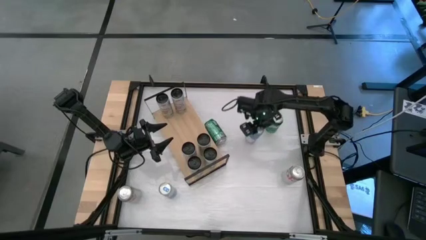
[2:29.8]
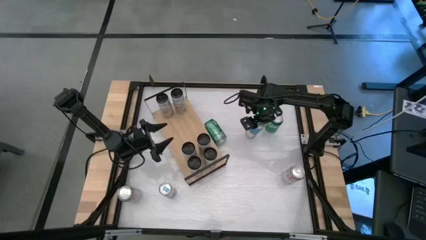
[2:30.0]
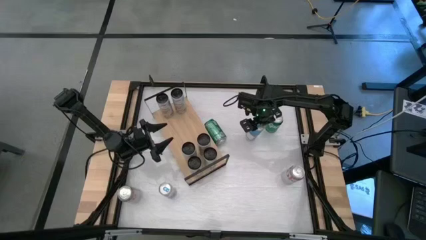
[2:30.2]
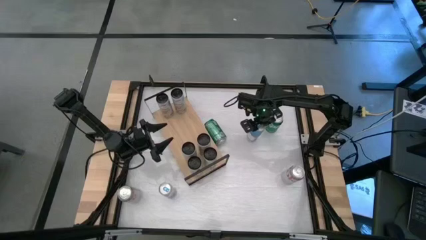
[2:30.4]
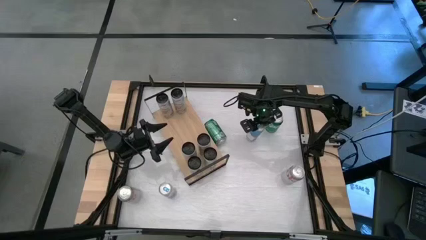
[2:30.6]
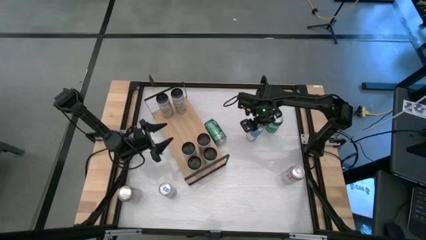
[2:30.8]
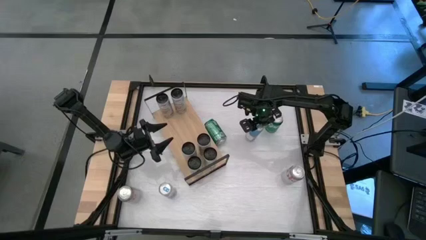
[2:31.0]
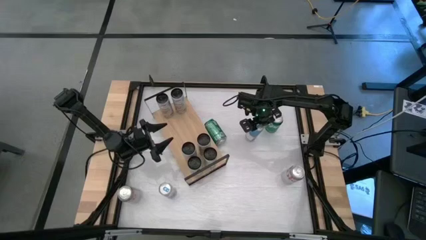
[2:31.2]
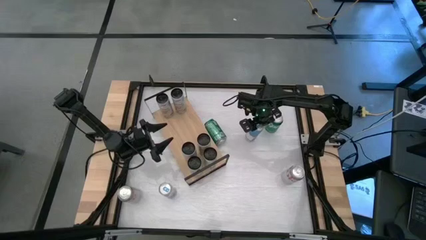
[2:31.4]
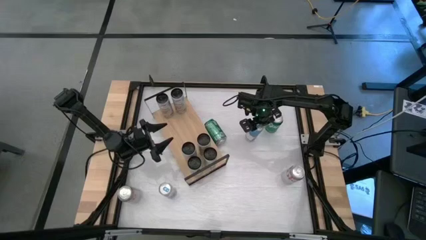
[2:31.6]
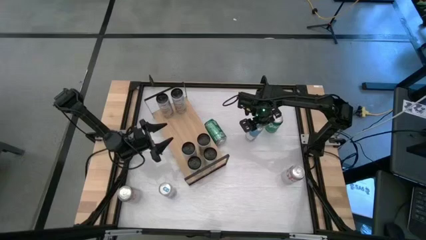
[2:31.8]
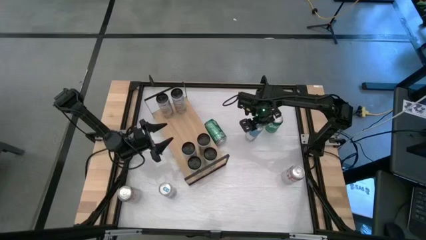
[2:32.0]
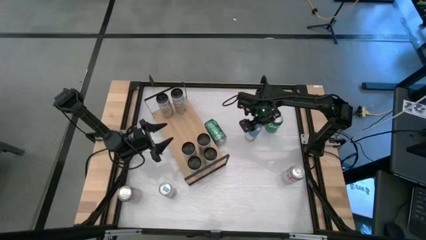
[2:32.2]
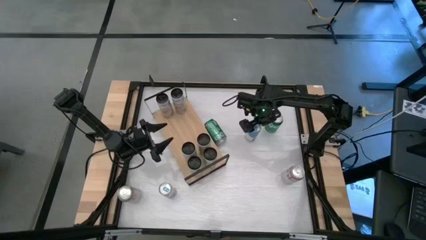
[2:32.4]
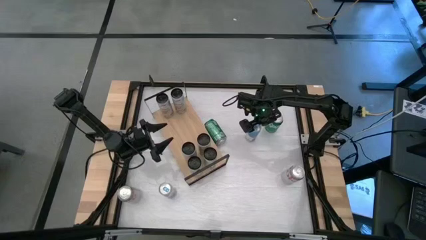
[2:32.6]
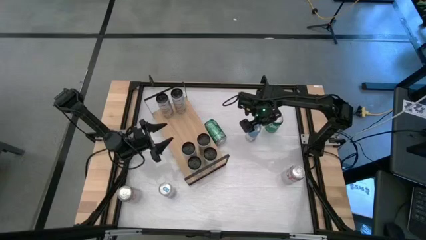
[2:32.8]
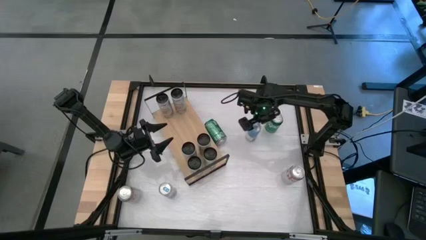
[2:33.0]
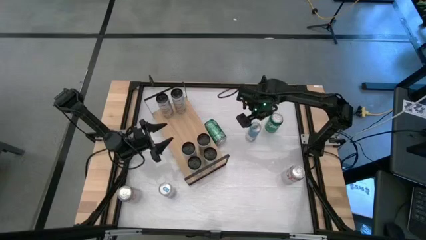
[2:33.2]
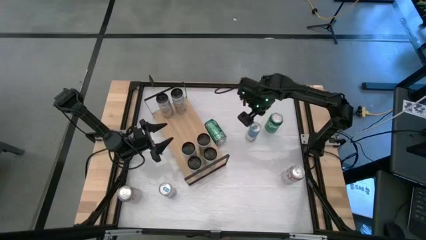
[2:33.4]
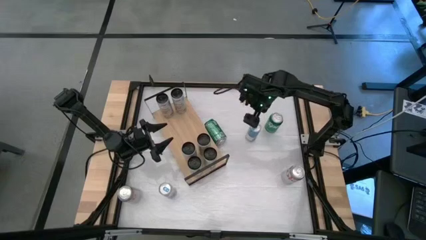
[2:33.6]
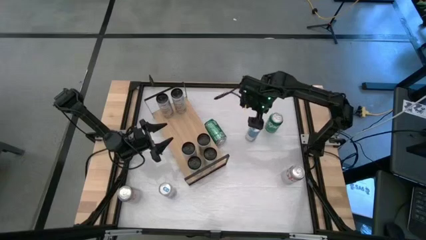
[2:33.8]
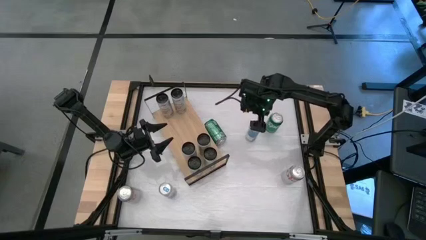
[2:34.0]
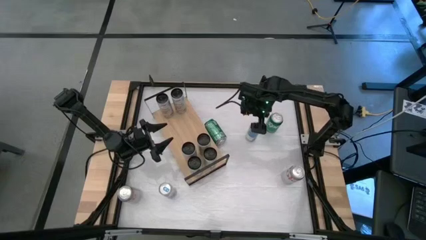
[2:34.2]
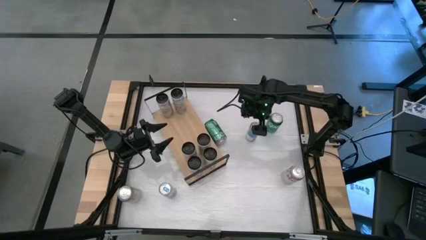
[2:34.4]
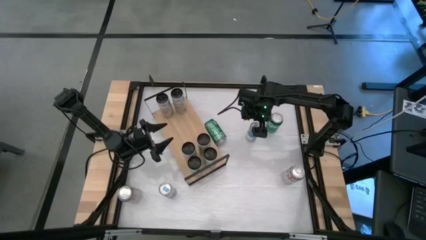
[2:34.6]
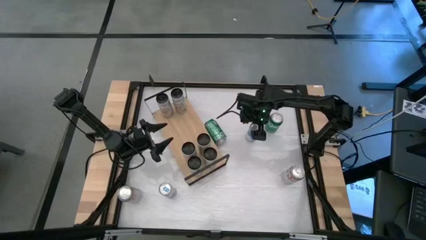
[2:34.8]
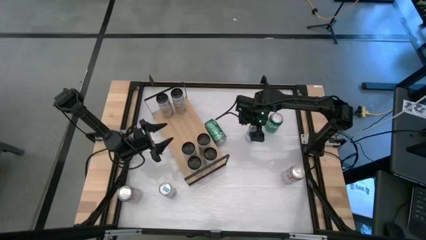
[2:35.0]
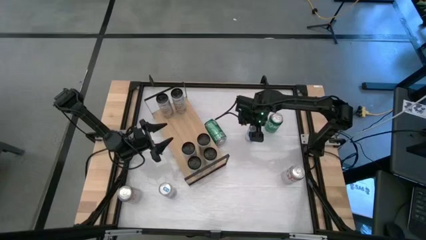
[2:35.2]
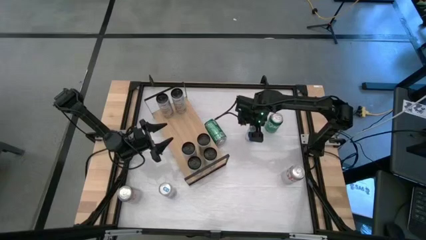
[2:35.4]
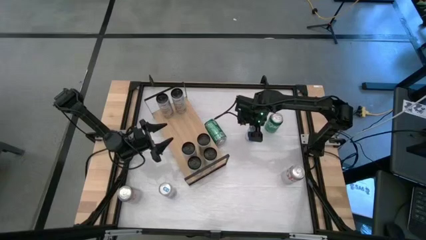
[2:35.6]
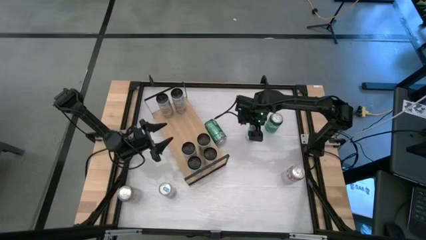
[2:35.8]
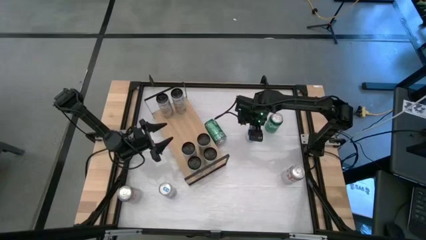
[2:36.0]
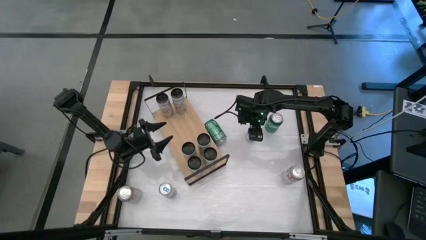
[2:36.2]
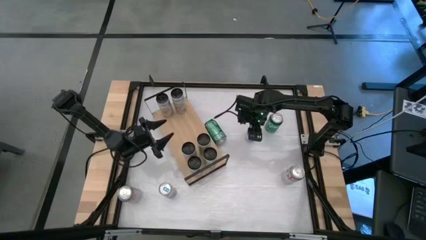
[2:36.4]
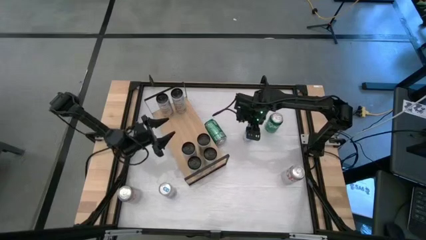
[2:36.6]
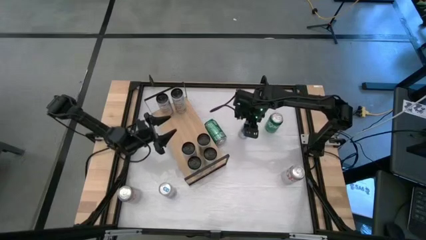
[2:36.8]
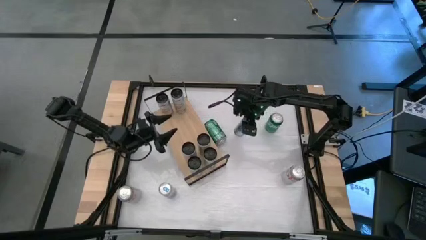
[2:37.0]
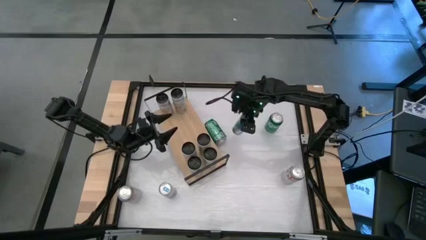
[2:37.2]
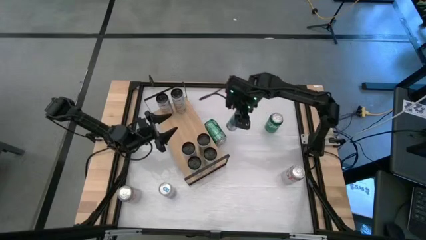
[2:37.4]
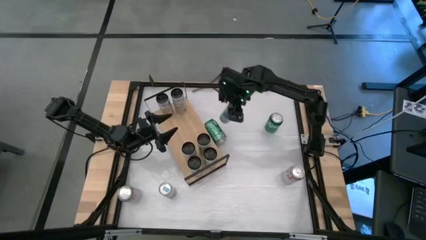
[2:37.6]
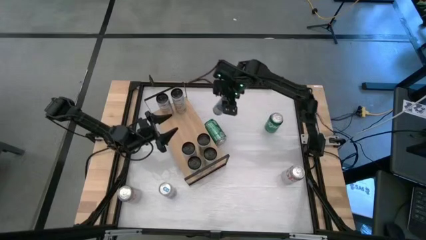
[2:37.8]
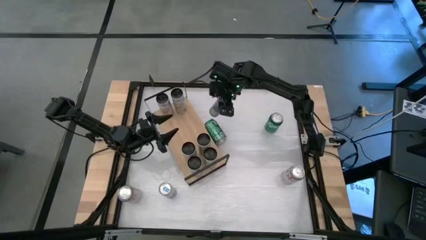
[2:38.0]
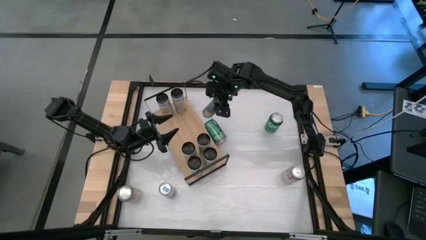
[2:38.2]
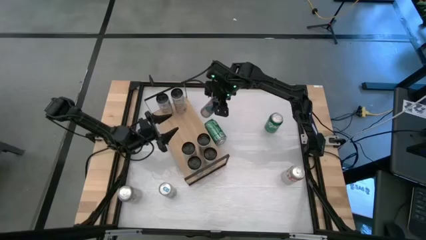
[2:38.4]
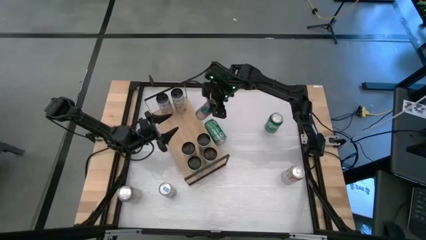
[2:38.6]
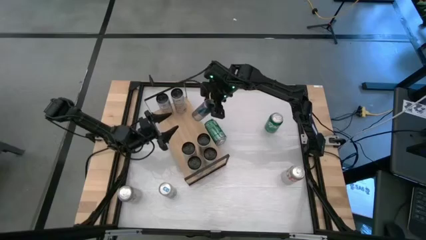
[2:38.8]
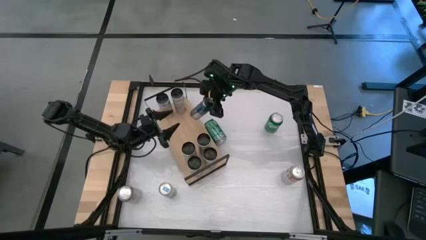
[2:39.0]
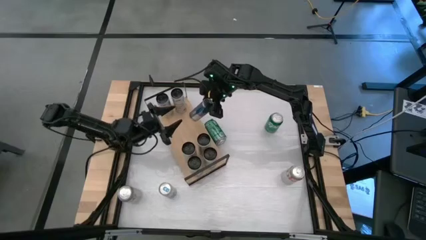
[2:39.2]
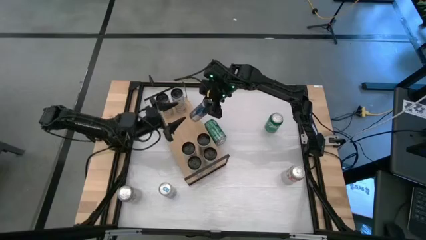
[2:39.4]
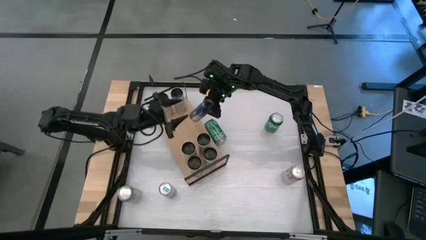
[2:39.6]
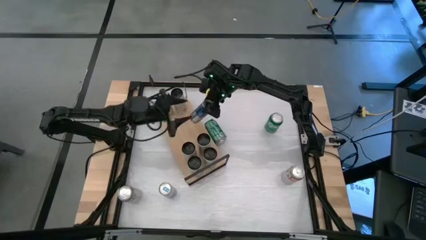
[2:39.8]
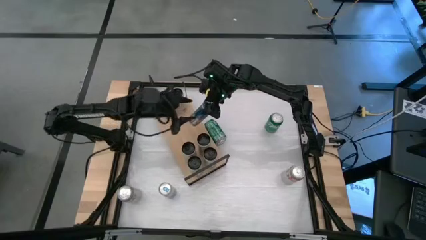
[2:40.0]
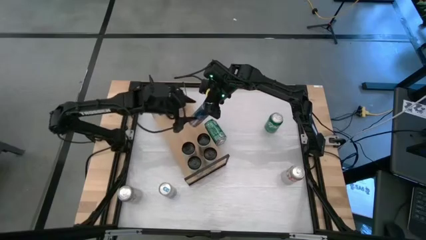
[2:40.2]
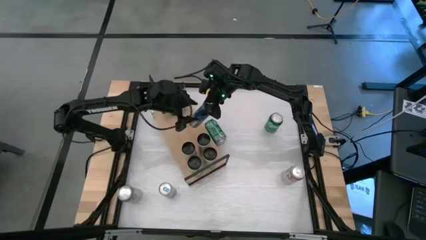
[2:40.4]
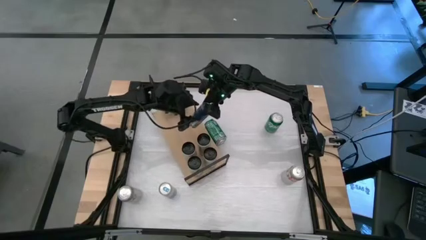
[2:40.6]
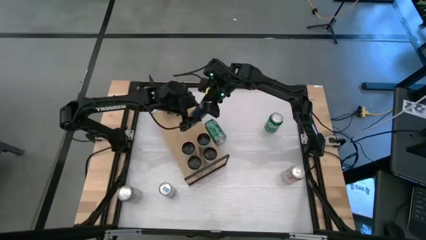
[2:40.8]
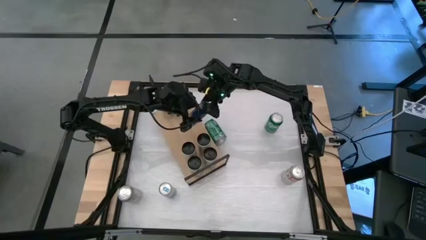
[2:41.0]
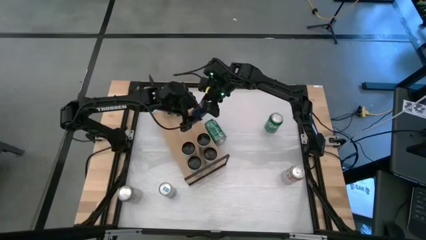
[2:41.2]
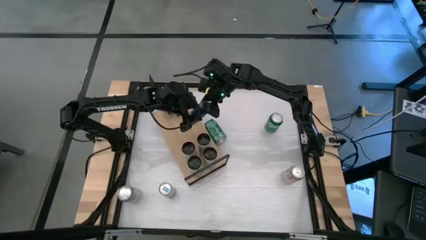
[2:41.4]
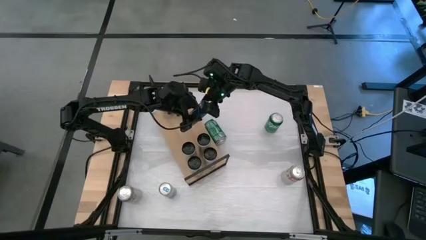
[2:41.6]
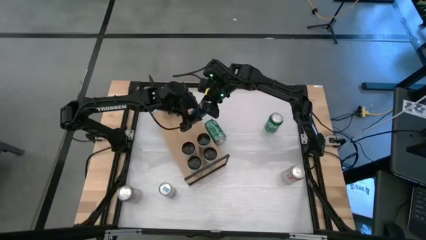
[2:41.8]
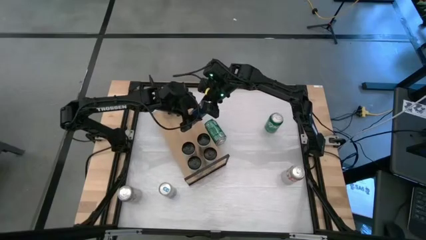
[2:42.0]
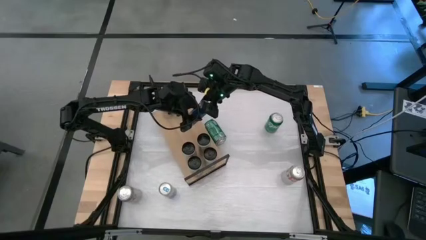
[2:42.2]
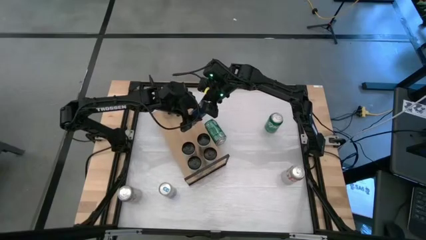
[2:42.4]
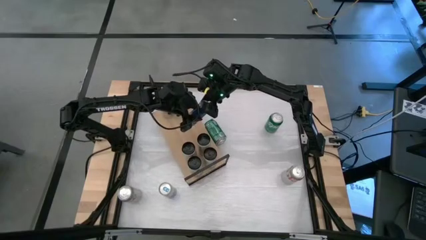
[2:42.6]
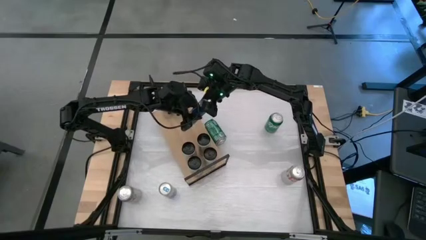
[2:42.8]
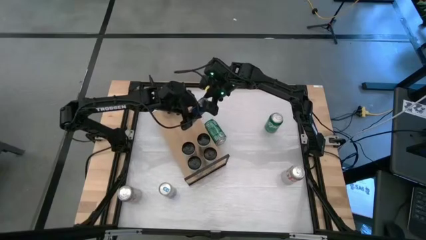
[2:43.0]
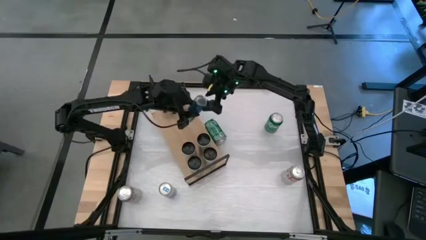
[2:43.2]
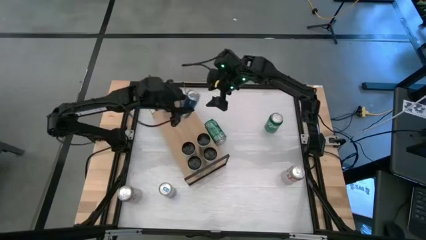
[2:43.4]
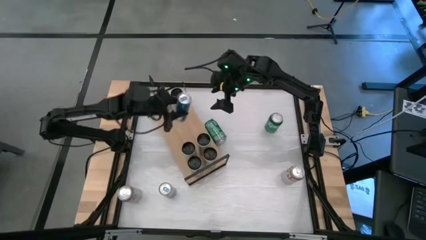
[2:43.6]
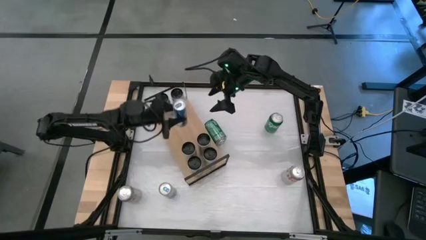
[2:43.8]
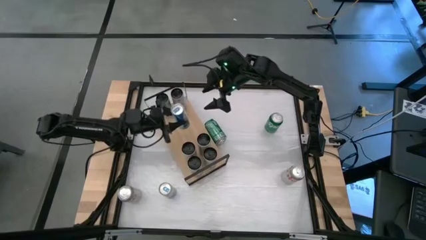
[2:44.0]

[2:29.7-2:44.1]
Task: Place canned beverage on shelf
Put the white blue soda can on the shelf
